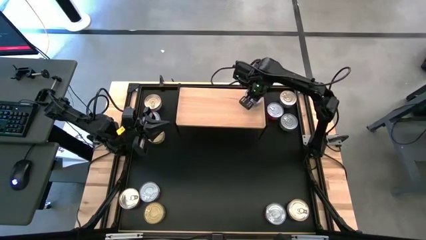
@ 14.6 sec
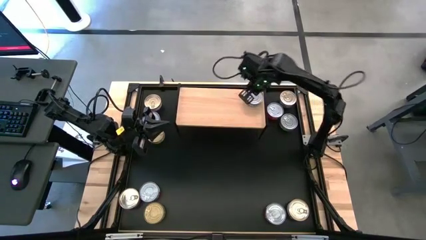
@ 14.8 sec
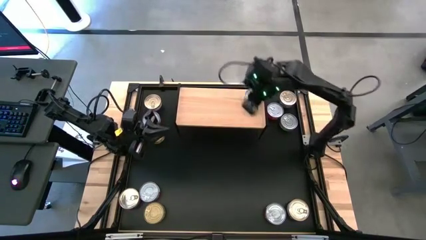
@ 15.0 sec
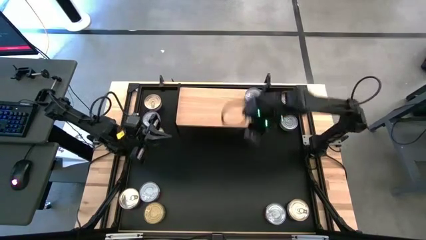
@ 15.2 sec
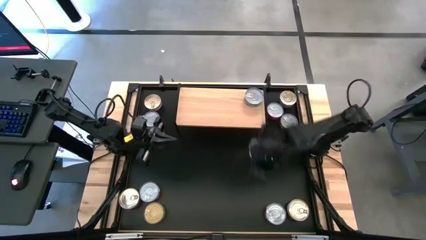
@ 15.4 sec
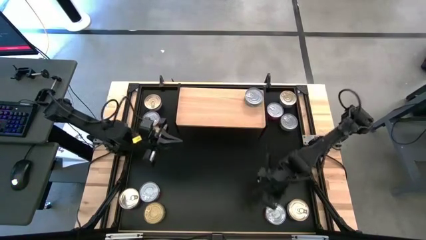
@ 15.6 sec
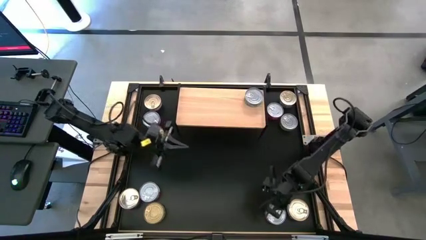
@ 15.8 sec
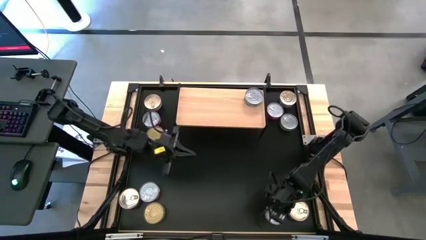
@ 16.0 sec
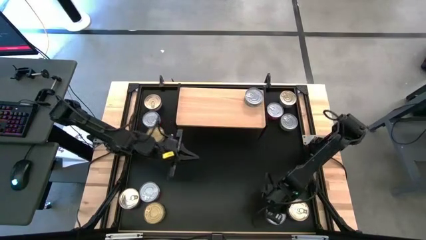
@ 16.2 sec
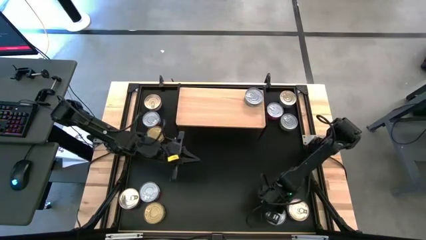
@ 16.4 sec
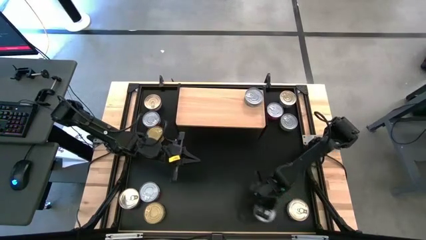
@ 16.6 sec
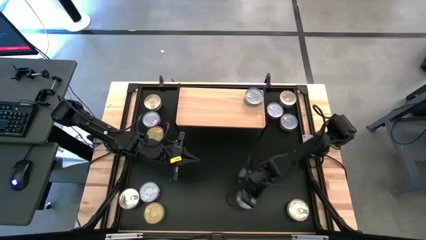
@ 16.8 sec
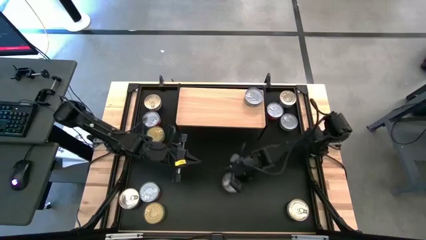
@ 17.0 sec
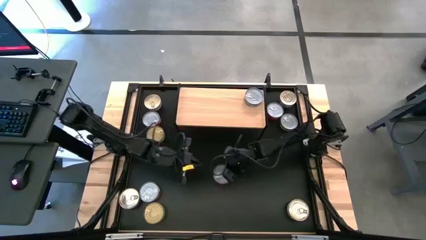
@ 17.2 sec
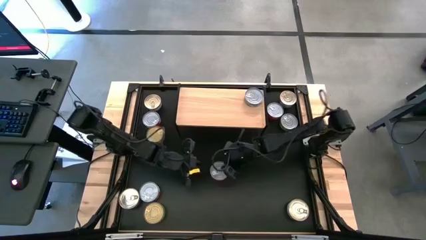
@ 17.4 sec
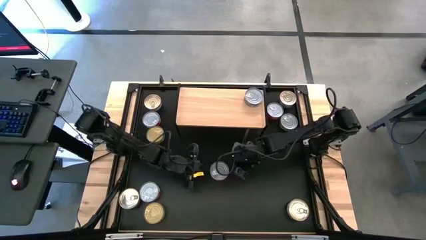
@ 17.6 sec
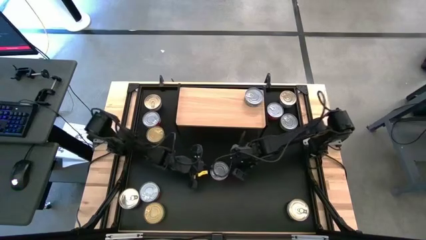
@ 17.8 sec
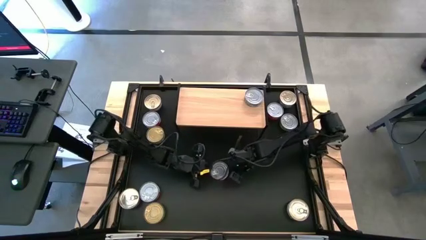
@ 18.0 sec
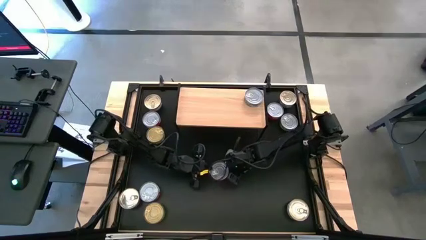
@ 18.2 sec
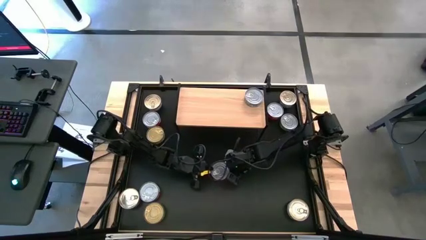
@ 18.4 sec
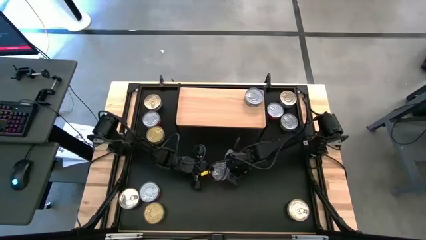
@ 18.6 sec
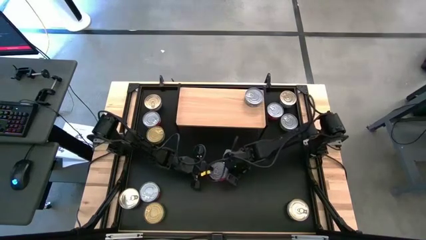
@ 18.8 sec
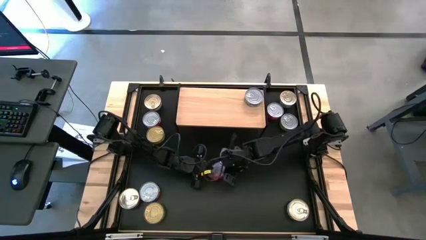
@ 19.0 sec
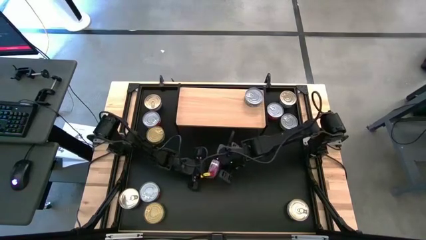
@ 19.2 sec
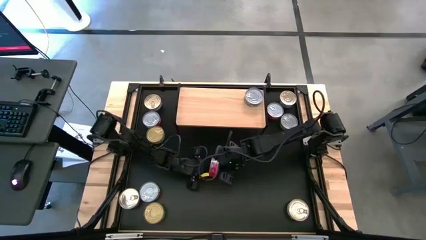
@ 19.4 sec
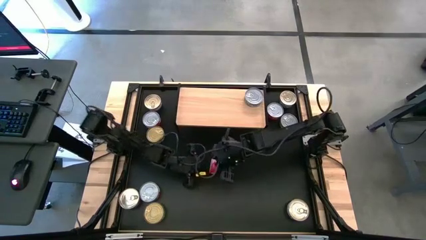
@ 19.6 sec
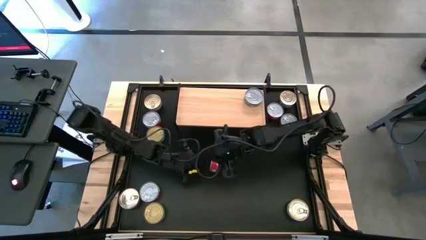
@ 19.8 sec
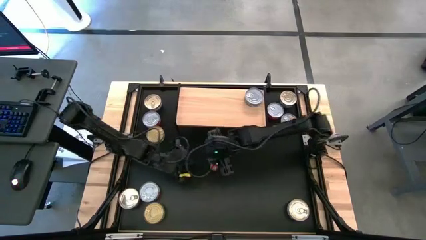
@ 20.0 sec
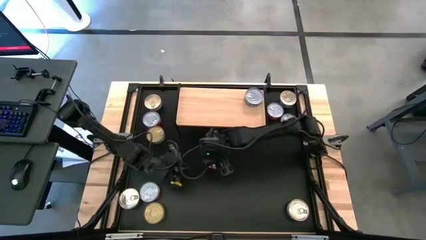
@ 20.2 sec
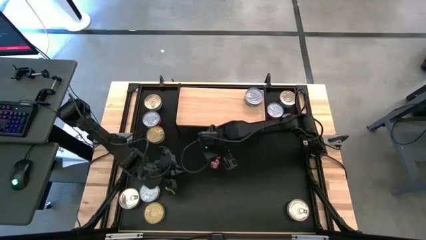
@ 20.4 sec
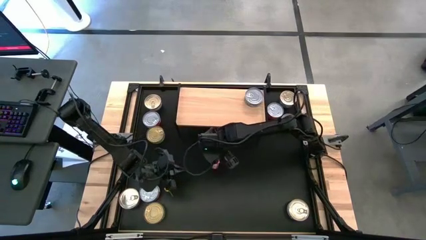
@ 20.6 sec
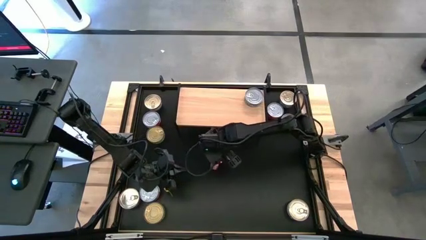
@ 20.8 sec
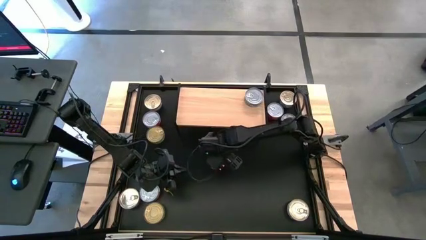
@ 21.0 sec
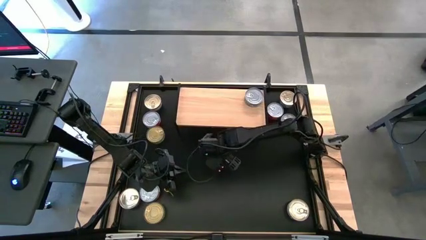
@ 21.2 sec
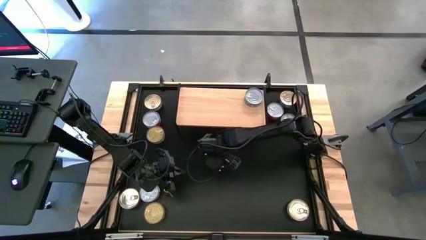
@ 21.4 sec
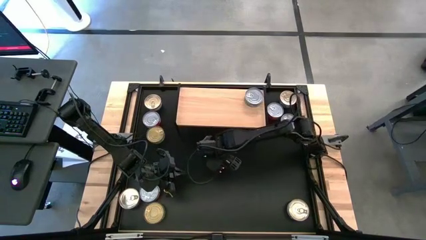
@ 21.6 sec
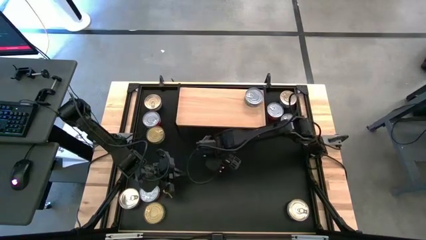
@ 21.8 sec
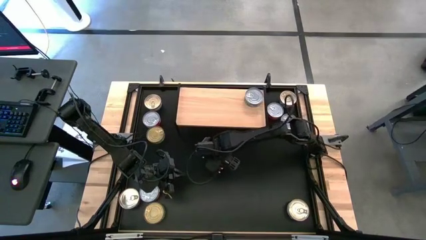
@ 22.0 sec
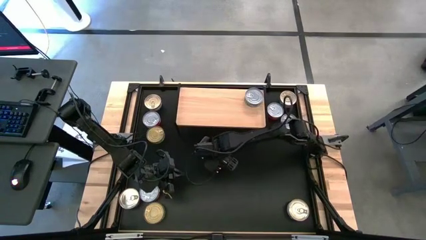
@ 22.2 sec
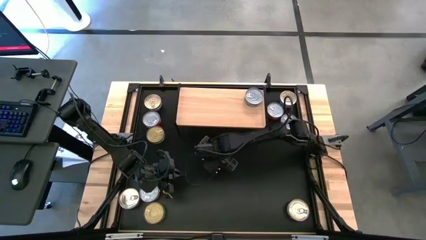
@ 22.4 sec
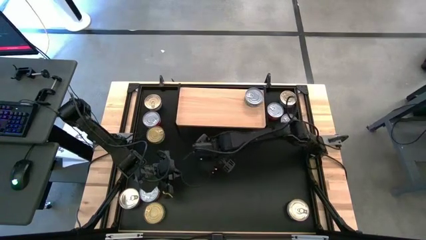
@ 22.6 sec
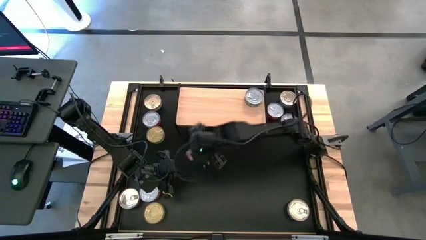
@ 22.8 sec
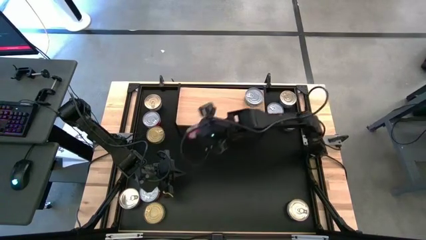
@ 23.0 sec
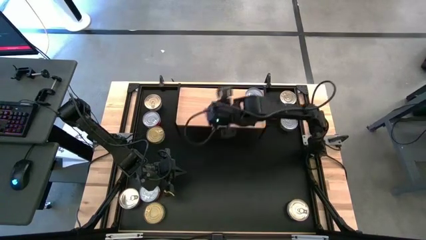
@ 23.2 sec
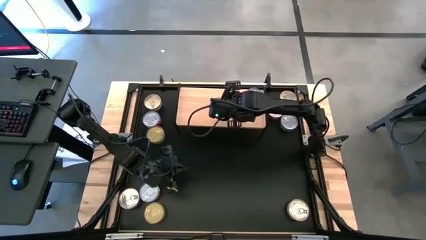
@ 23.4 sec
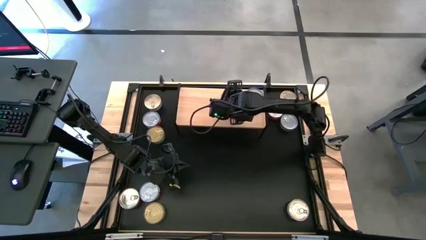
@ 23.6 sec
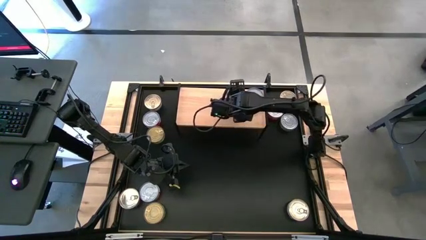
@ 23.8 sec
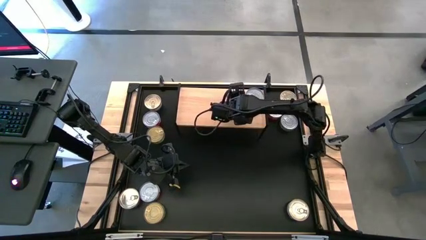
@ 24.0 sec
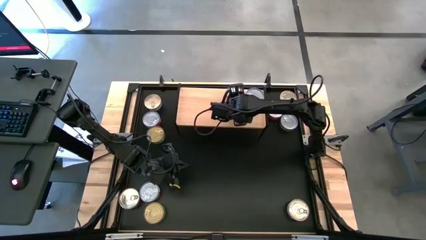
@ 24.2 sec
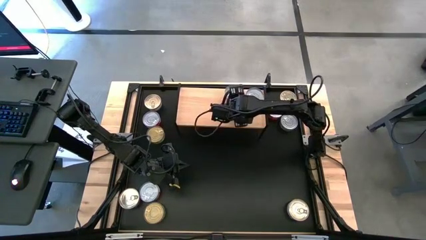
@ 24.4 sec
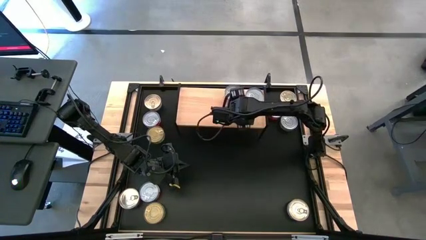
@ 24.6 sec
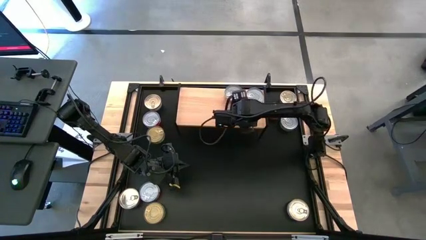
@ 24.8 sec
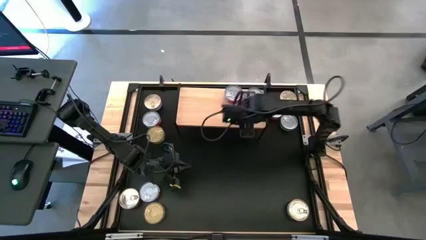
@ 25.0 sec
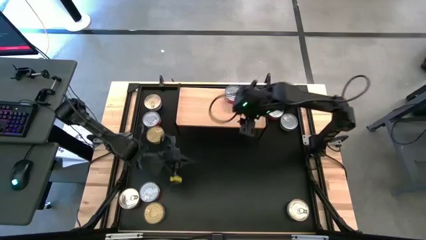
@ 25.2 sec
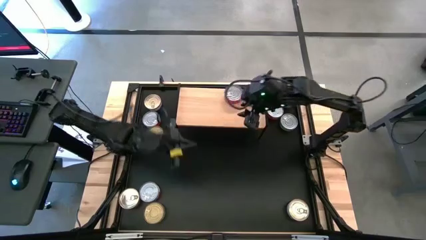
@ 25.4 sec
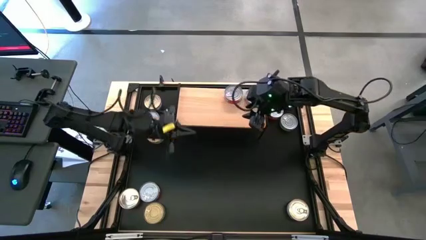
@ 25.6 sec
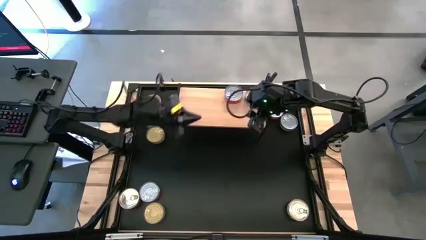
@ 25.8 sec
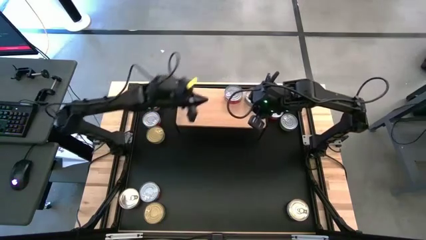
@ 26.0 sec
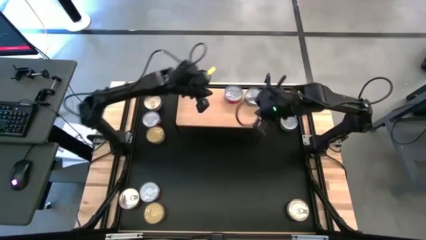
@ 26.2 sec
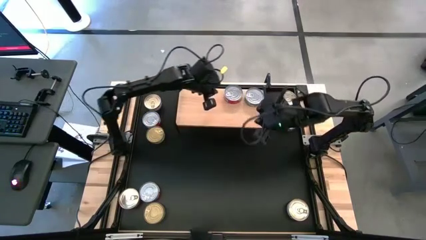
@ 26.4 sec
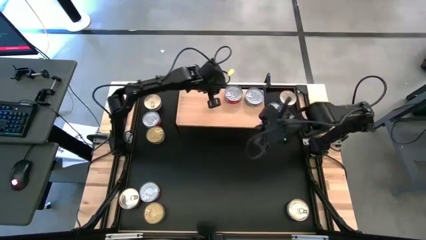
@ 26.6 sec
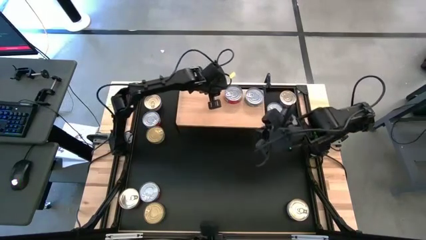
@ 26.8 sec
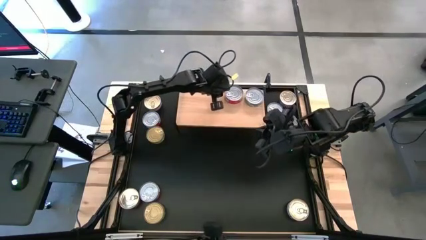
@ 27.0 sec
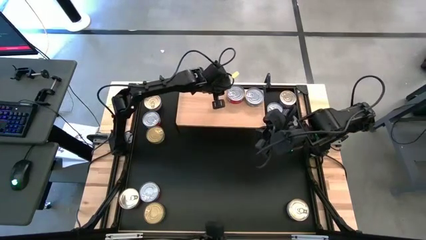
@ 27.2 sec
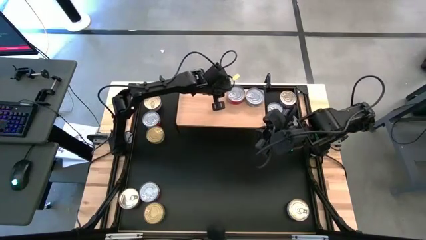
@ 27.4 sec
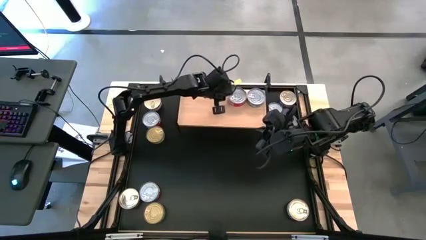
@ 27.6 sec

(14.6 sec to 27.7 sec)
Task: Stack canned seafood by type on shelf
Put the red tuna can on the shelf
